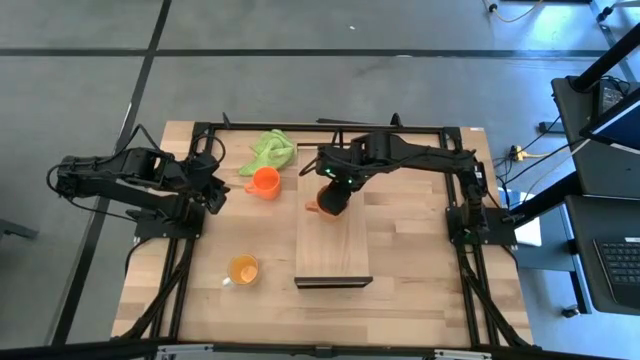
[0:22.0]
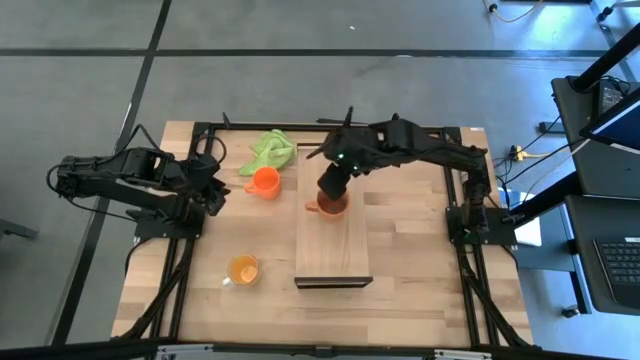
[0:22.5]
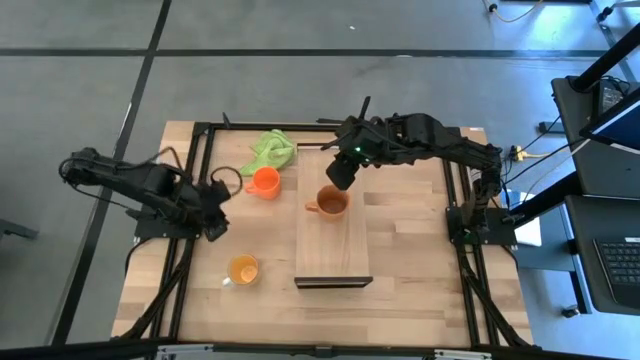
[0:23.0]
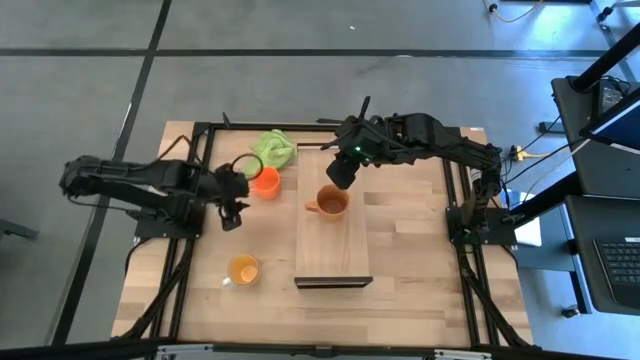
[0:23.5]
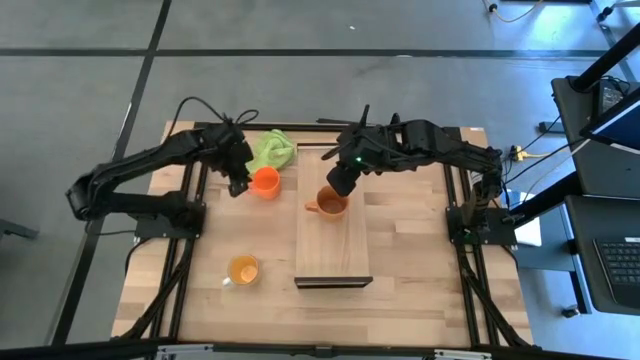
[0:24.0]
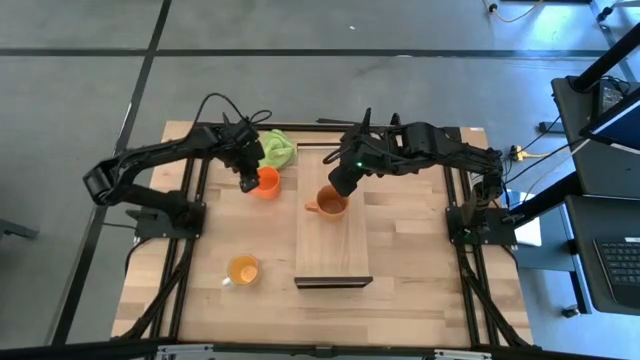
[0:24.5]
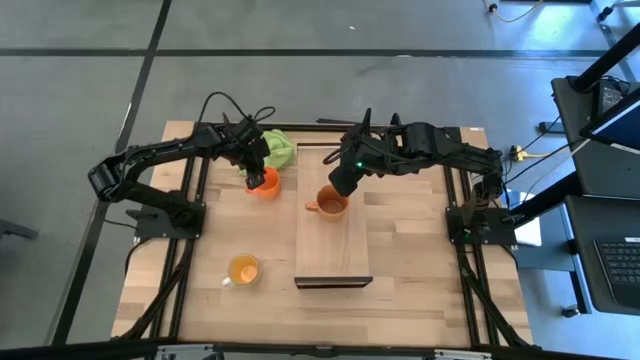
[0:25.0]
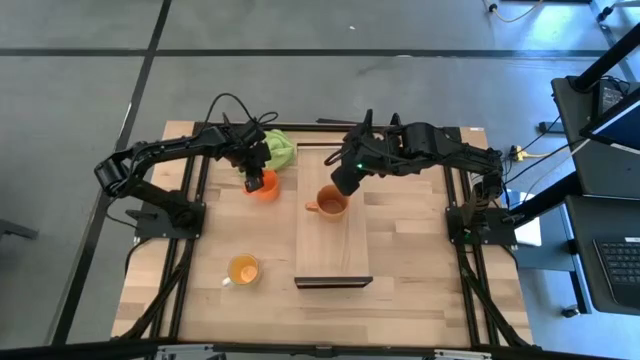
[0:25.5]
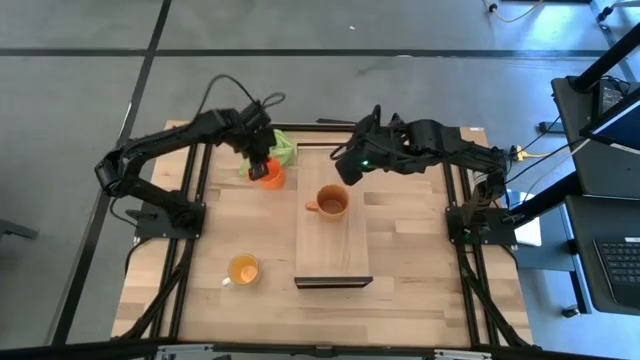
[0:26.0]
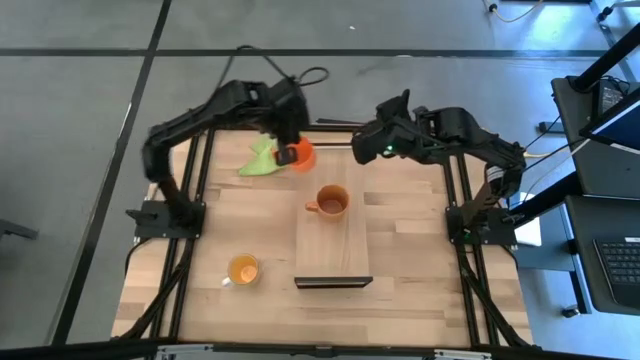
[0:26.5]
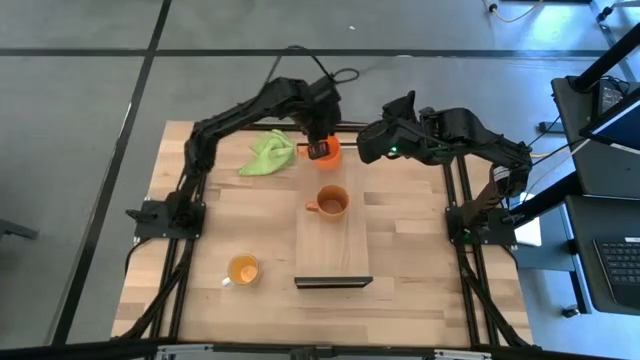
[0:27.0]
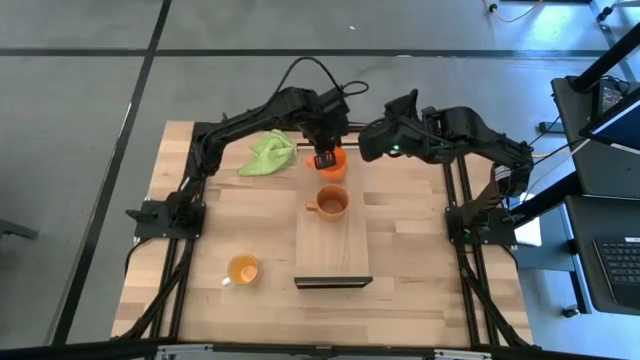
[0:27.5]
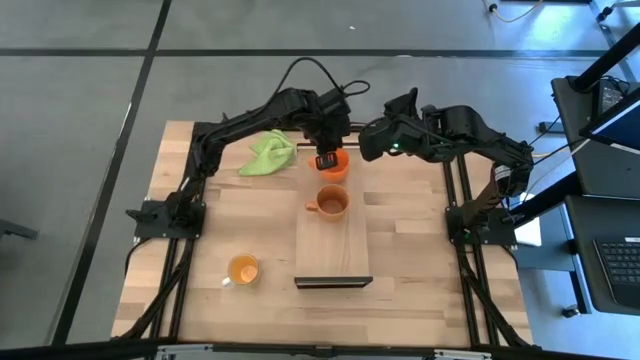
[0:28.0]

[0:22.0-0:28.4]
Task: Stack small to large cups/mugs on shelf
Put the orange mug on the shelf

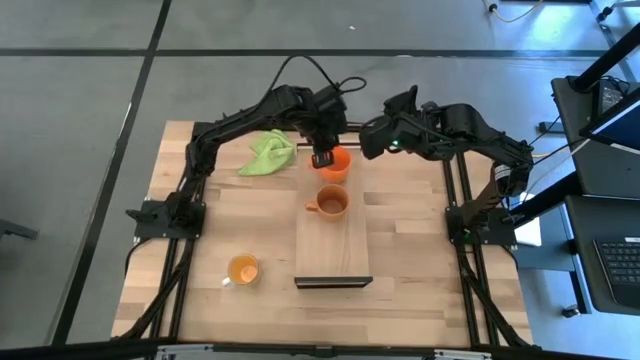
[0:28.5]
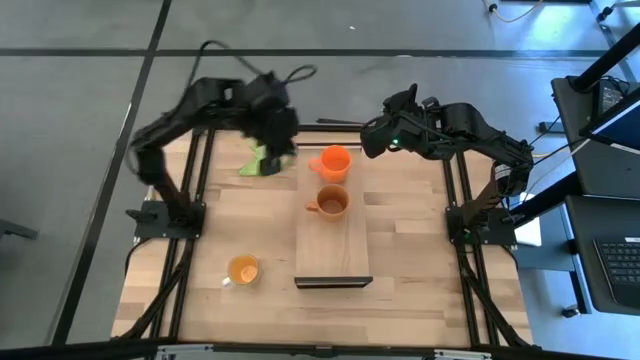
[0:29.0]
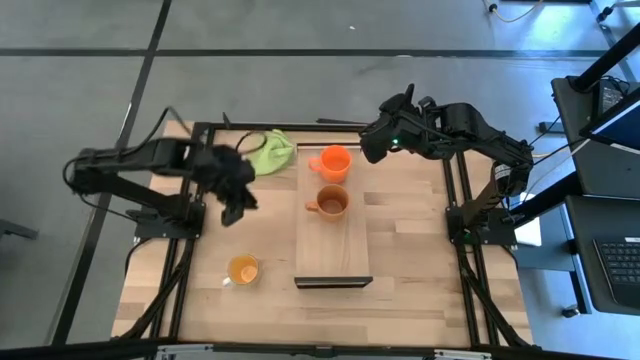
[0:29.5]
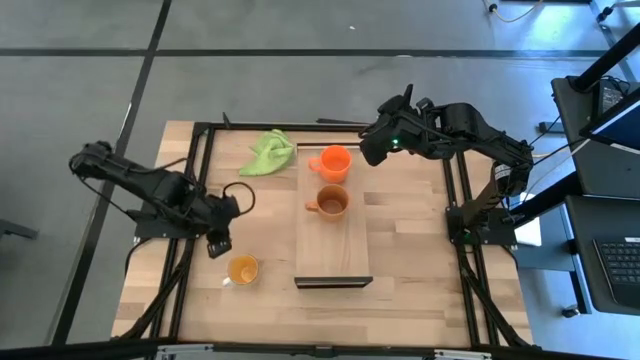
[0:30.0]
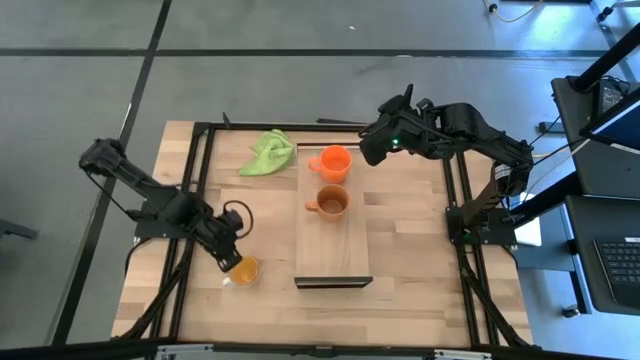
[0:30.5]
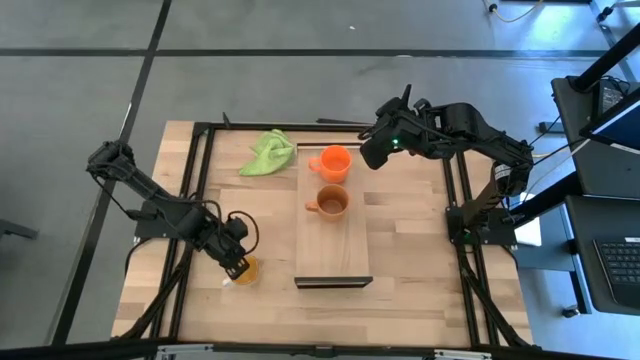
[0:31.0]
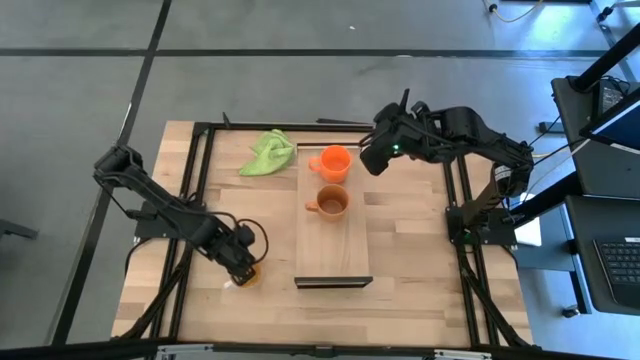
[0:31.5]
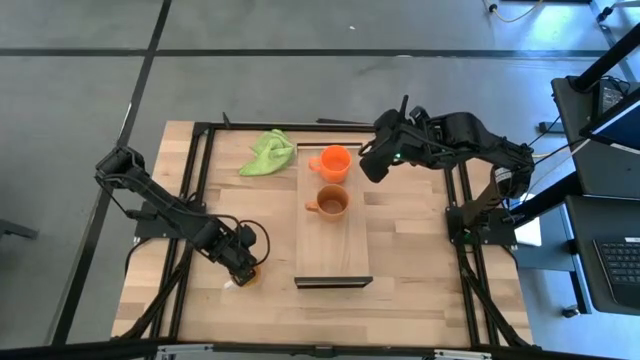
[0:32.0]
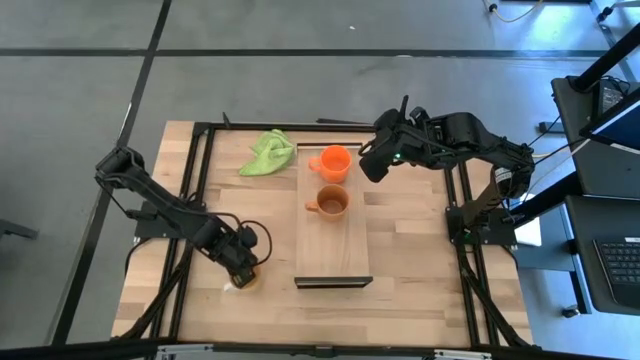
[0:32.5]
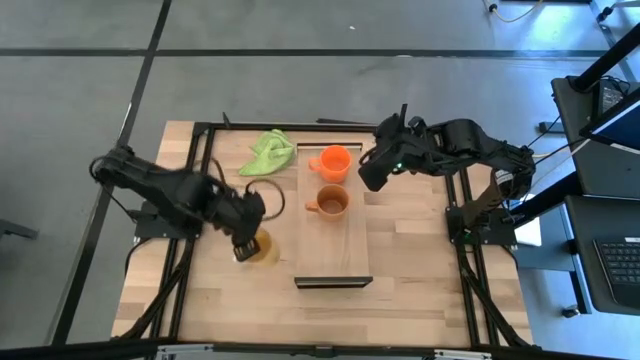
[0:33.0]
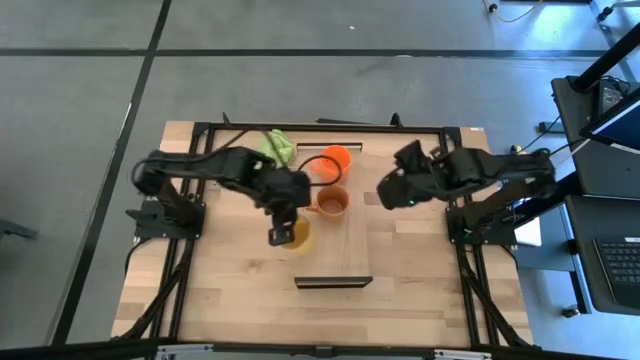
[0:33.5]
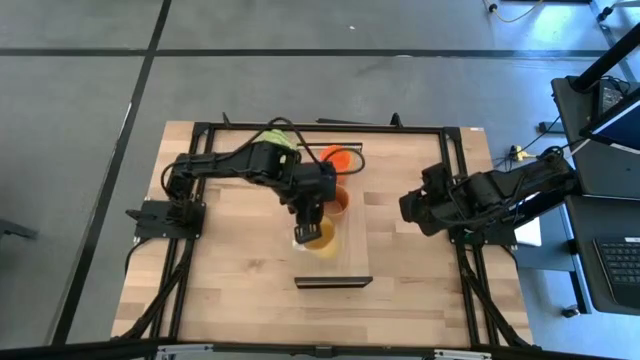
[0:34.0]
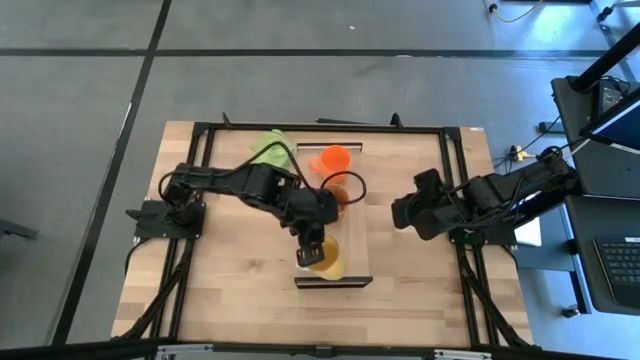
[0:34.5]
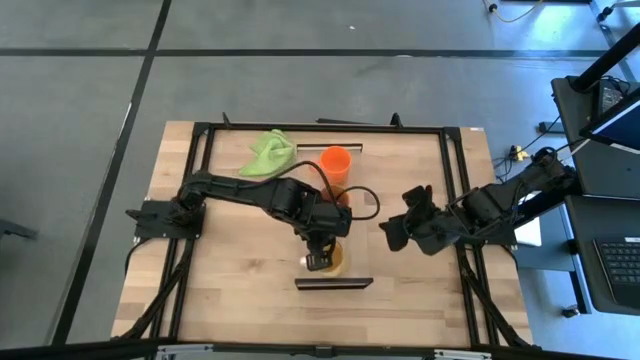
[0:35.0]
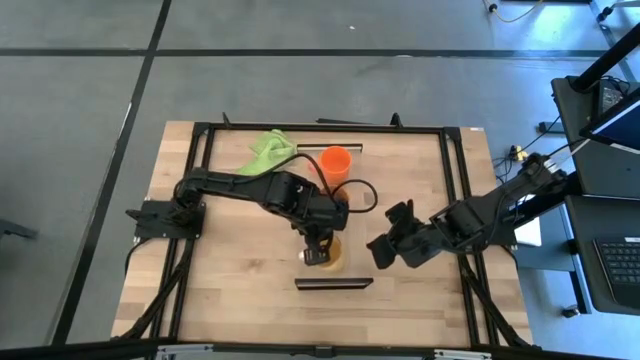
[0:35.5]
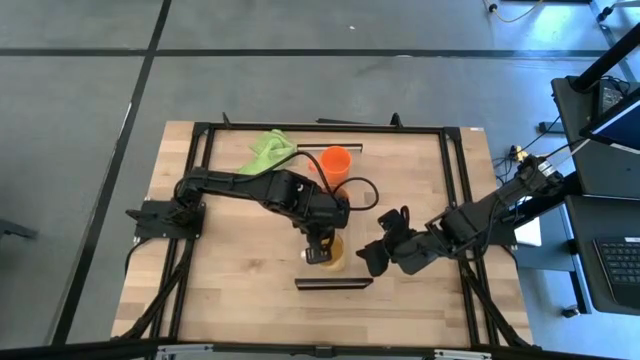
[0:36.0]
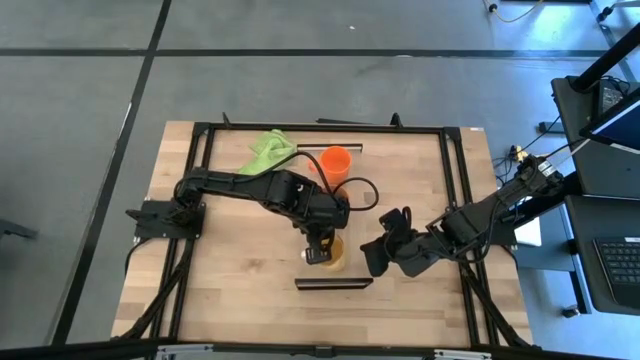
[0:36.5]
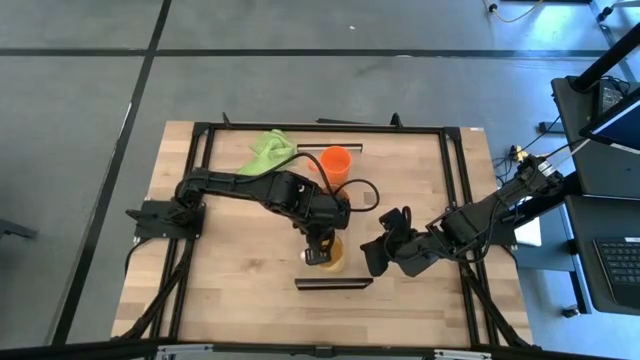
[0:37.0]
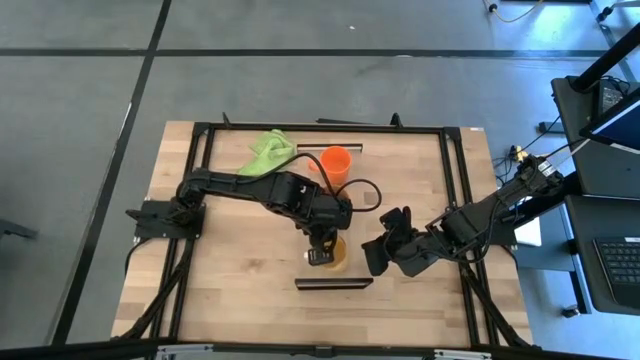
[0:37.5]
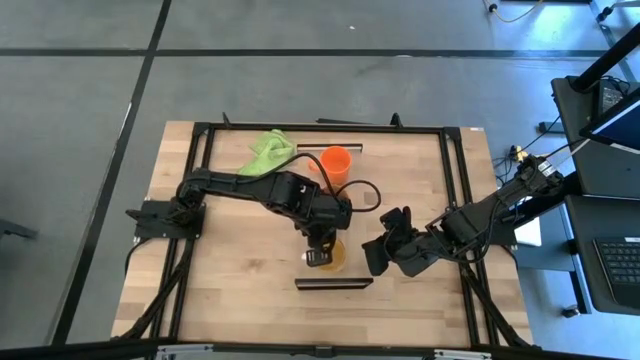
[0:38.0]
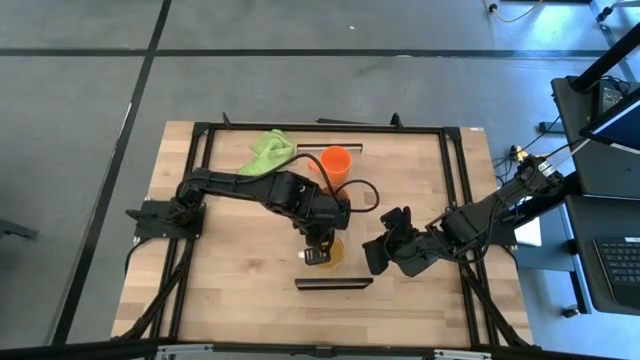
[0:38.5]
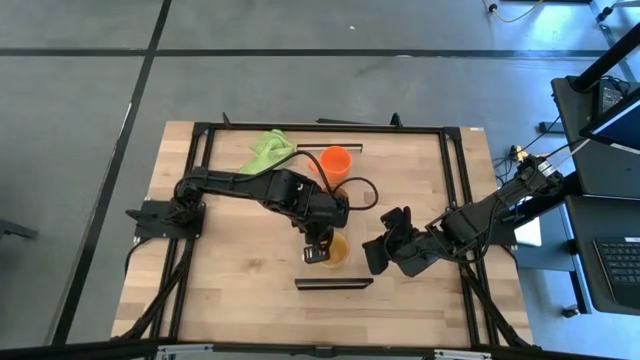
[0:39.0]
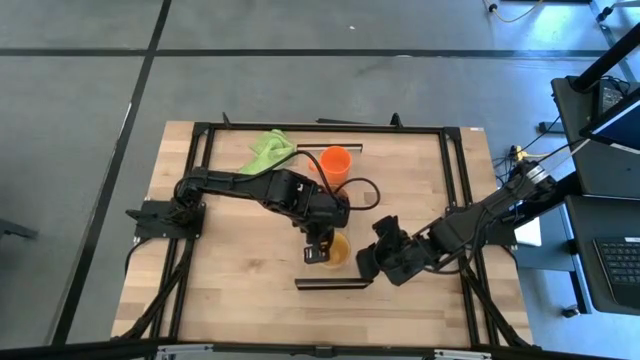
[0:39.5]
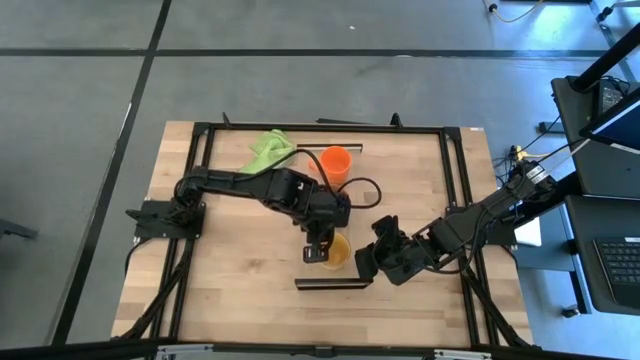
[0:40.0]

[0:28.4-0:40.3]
Put the yellow mug on the shelf

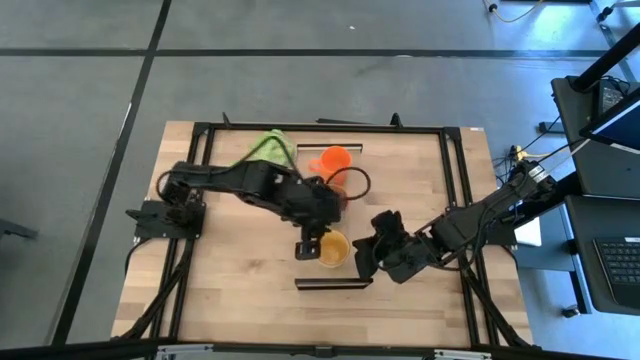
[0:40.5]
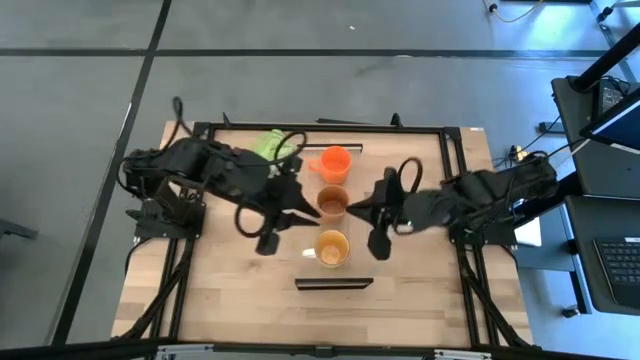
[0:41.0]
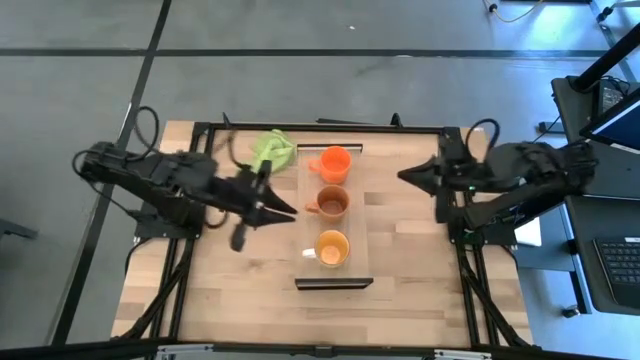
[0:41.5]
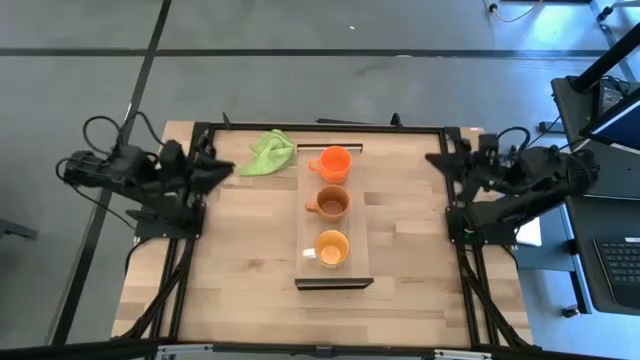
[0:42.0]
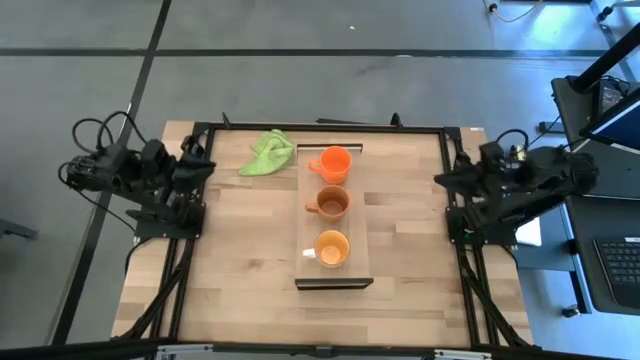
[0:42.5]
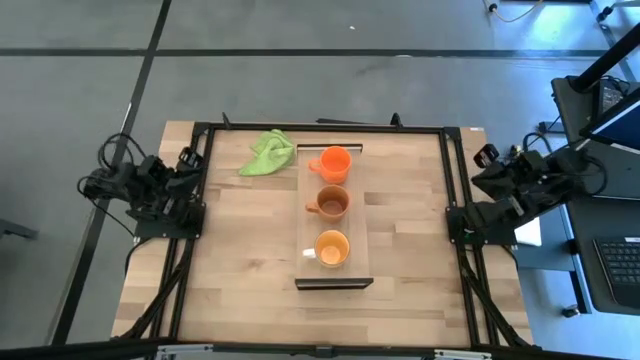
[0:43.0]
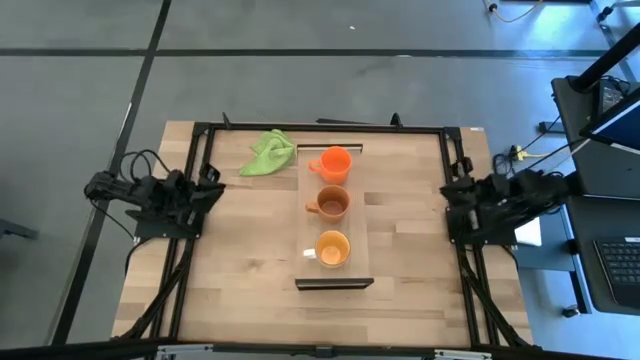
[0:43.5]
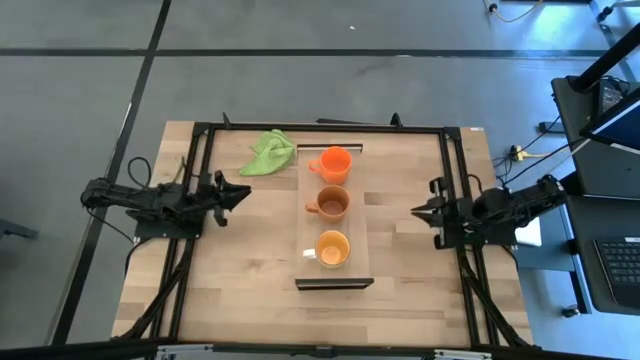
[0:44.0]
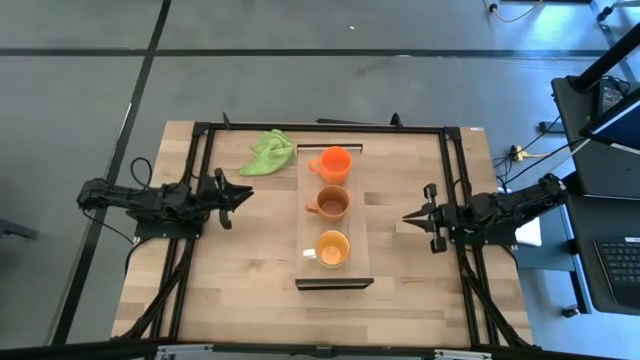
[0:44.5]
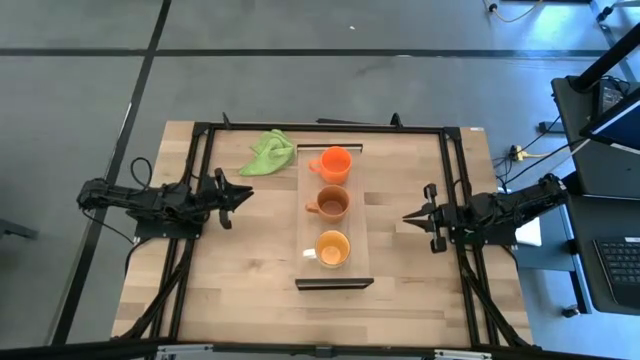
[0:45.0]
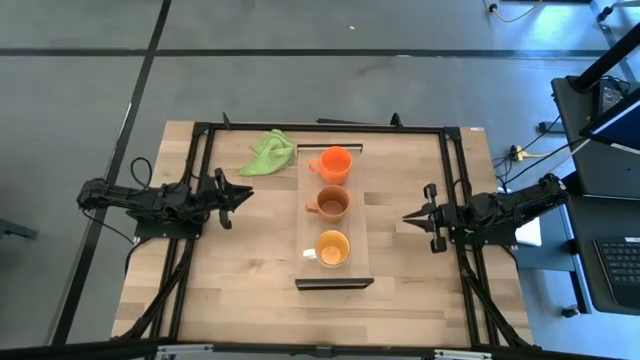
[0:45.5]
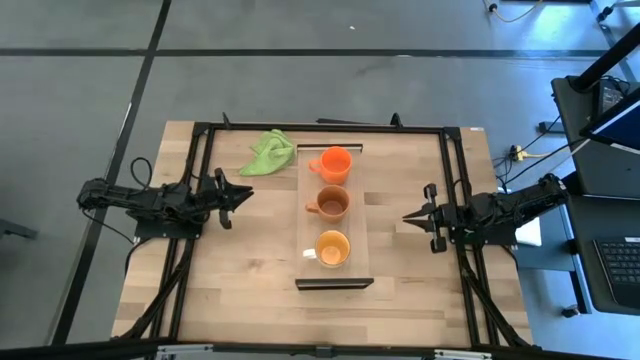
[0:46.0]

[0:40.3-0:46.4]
Return to Home Position
